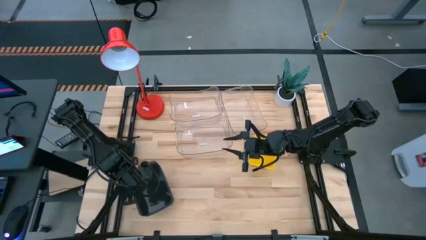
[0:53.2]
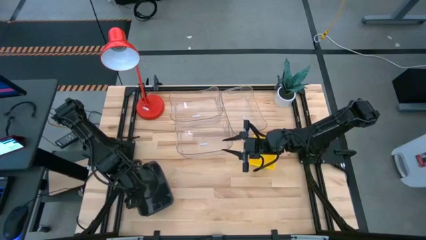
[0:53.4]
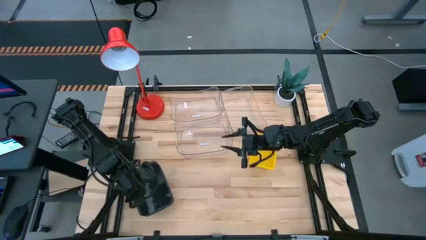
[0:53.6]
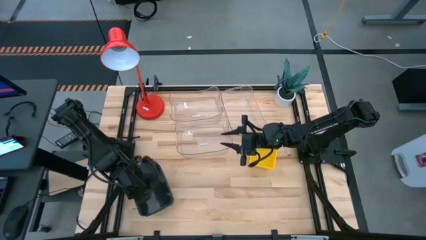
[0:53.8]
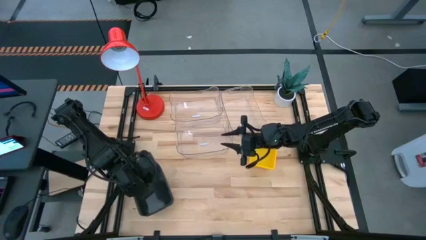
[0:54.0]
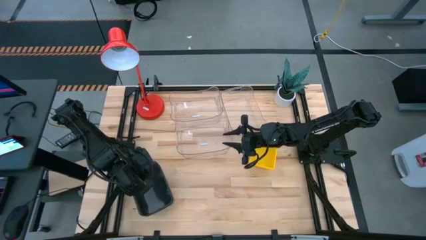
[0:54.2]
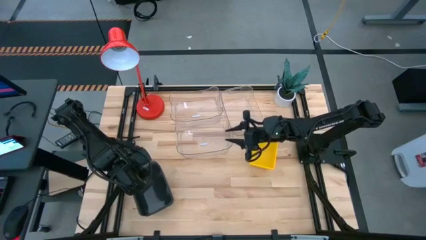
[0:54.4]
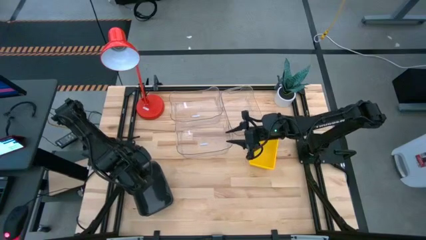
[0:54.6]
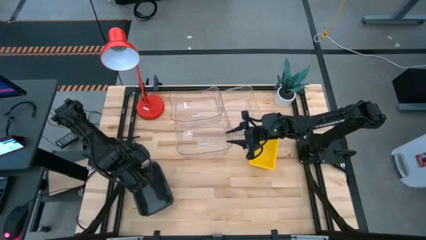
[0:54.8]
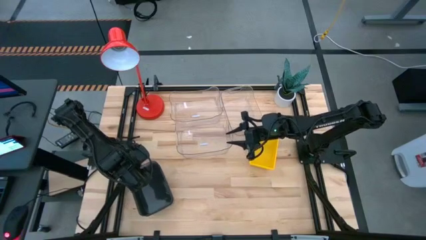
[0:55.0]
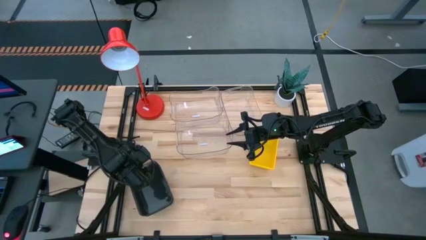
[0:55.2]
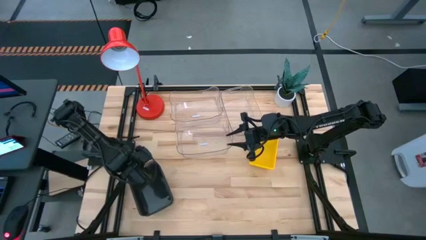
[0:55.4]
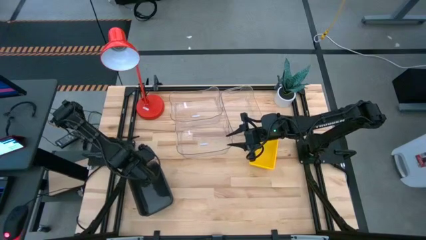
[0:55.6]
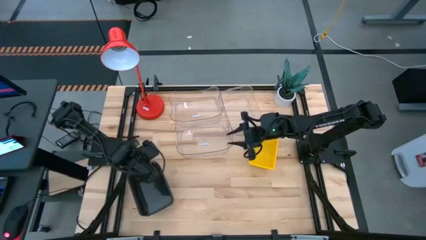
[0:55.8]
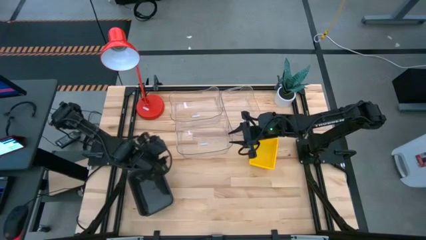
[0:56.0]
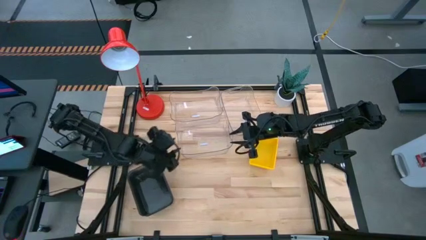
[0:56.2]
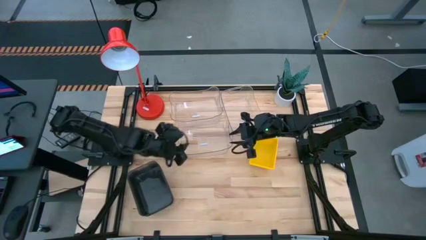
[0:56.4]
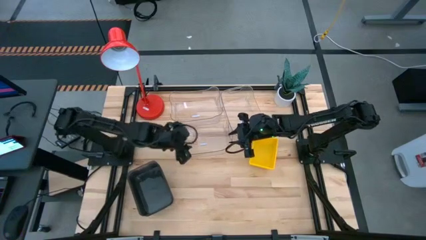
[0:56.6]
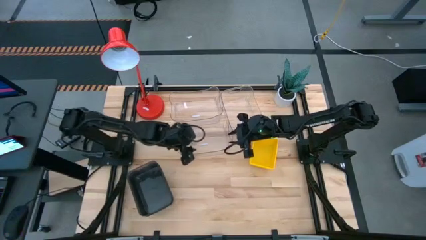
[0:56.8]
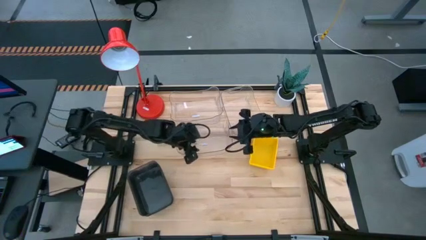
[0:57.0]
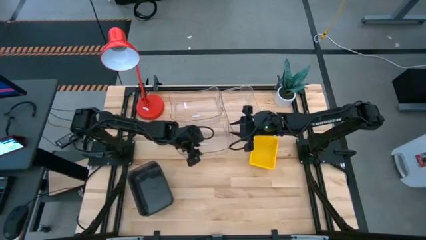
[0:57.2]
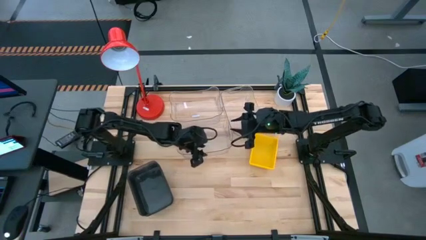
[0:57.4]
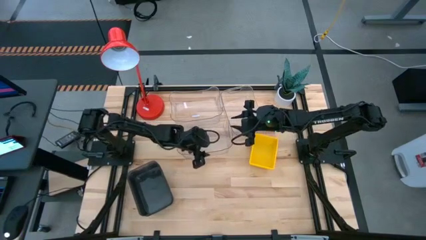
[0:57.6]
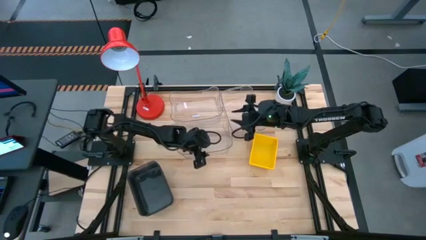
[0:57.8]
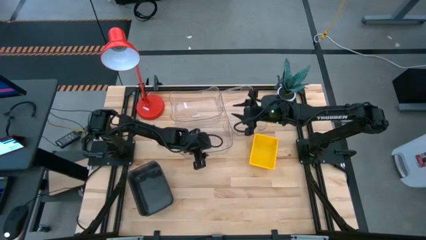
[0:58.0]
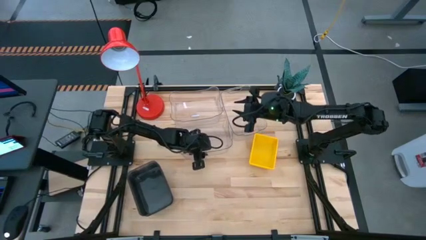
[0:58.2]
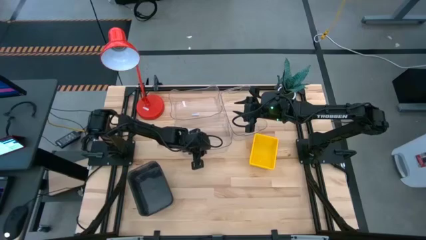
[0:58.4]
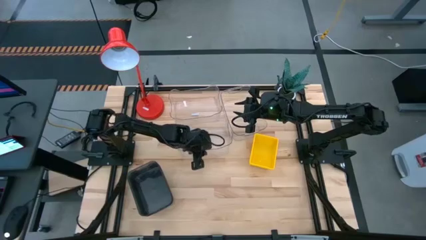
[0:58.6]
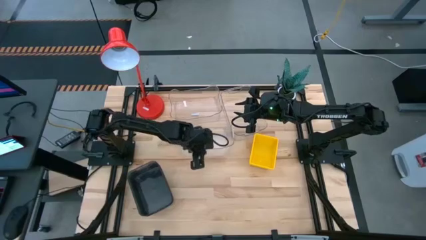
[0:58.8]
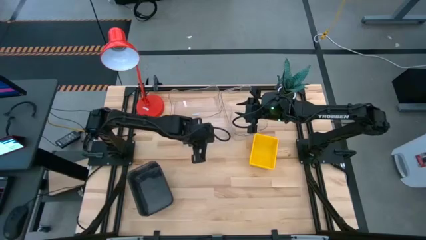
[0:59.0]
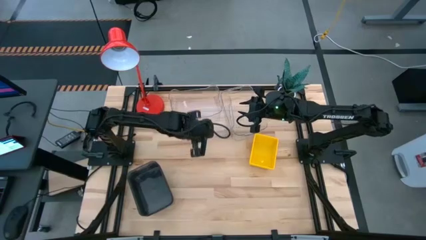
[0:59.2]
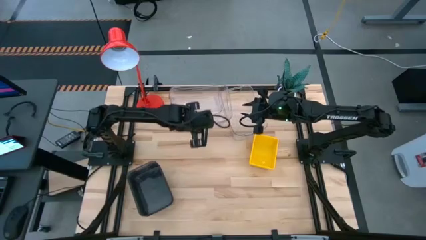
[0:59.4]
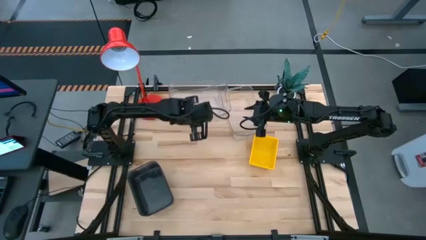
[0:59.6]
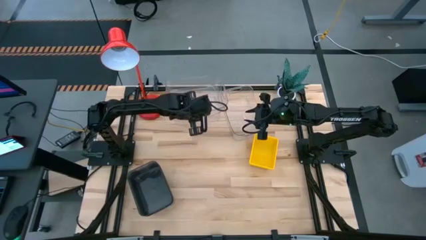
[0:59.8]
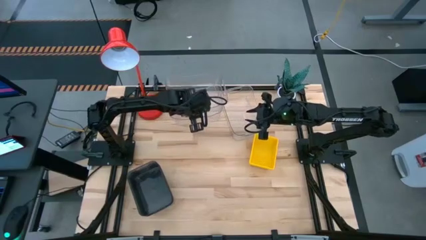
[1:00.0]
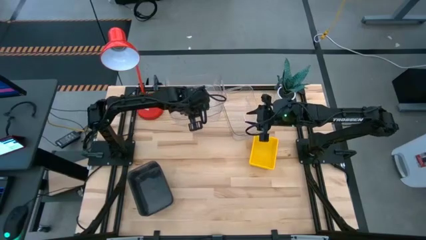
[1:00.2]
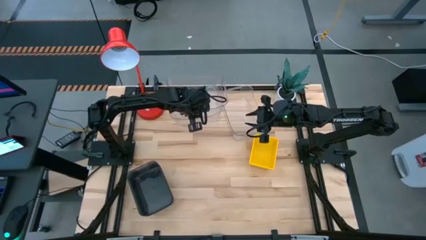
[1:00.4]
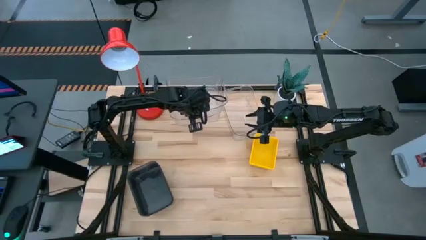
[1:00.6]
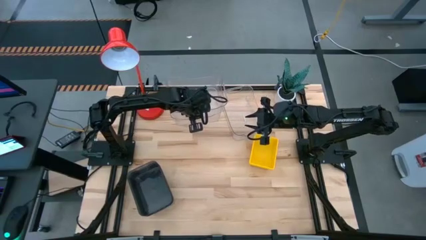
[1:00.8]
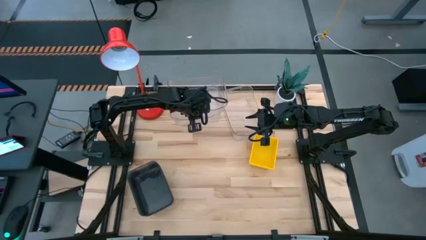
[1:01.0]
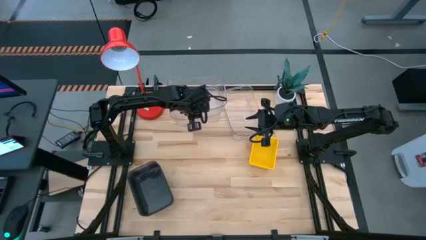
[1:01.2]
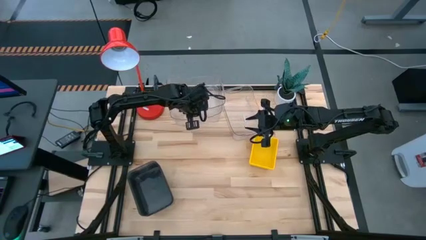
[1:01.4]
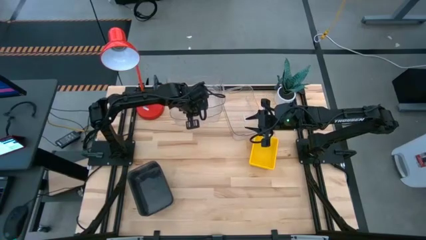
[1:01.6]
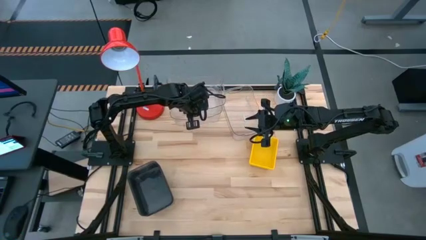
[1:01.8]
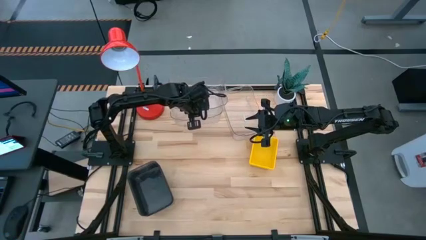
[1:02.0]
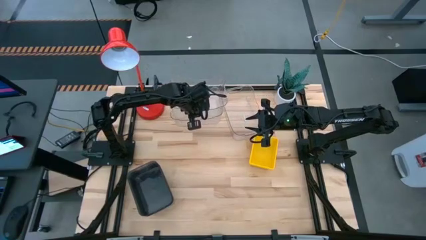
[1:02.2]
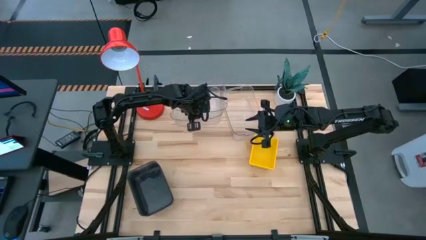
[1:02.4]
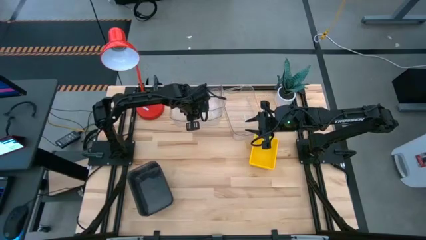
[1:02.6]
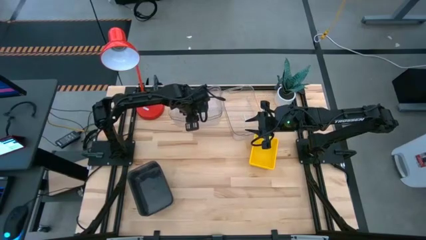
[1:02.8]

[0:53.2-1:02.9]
Stack the bottom transparent bin on top of the top transparent bin

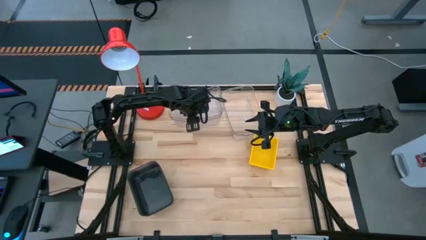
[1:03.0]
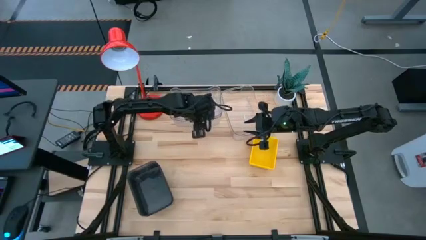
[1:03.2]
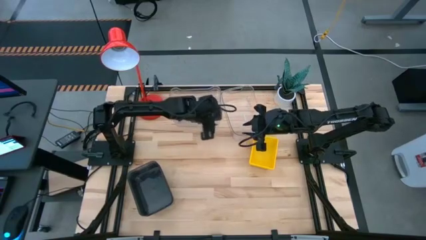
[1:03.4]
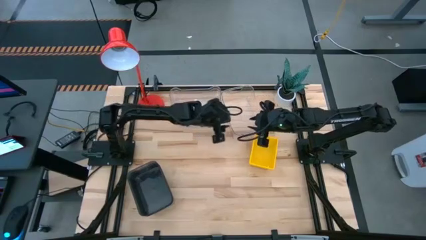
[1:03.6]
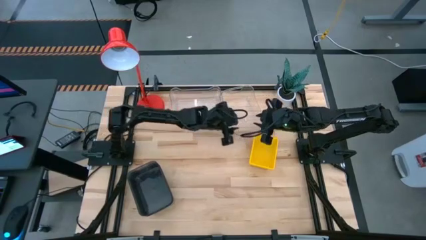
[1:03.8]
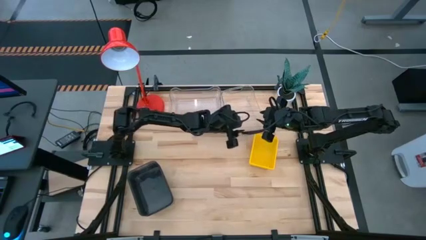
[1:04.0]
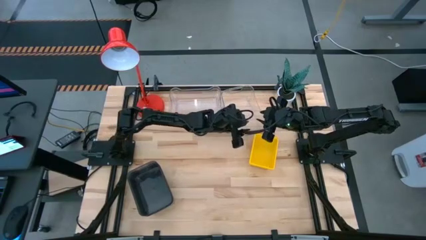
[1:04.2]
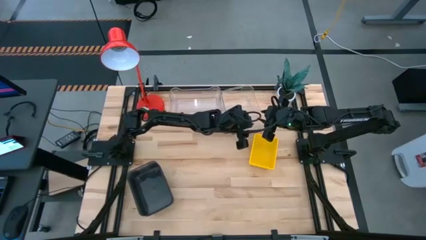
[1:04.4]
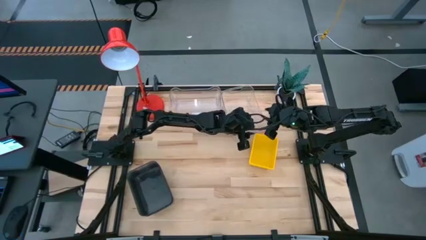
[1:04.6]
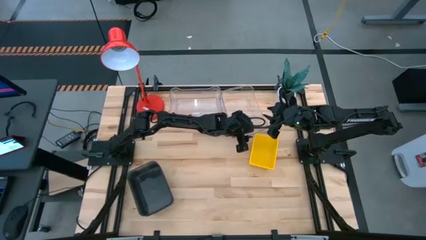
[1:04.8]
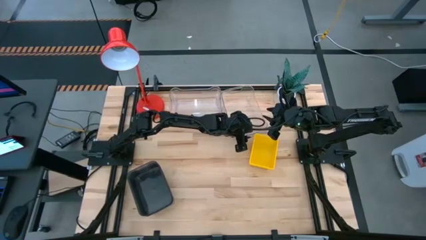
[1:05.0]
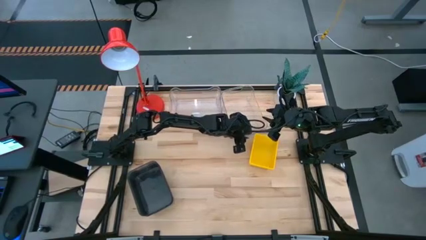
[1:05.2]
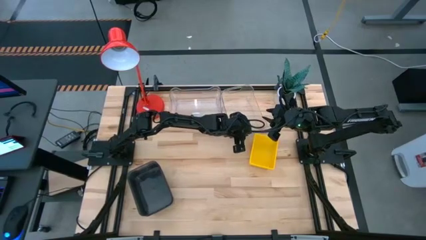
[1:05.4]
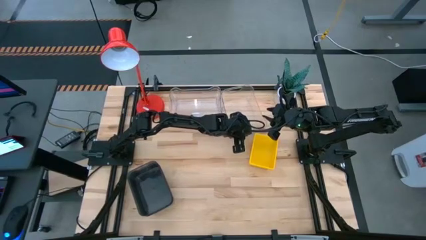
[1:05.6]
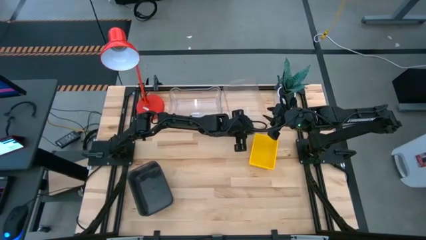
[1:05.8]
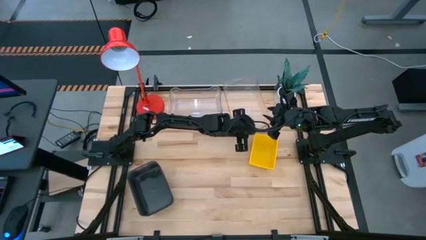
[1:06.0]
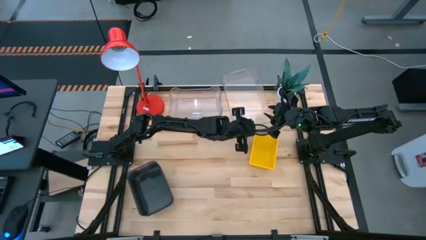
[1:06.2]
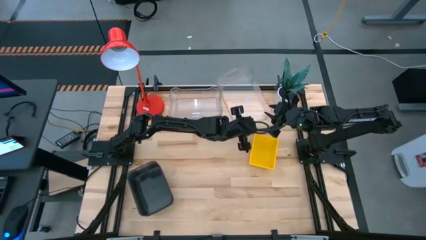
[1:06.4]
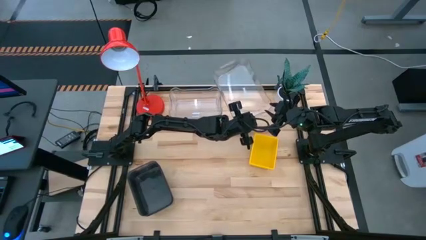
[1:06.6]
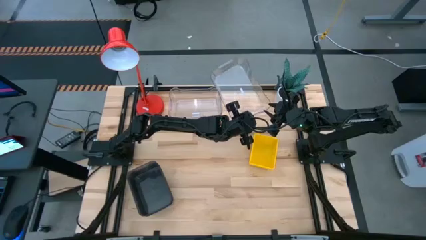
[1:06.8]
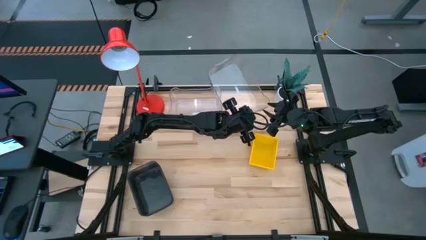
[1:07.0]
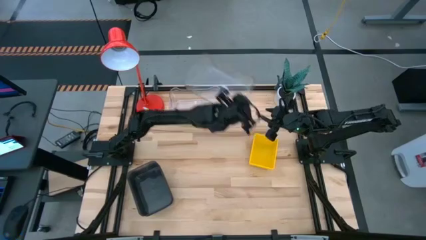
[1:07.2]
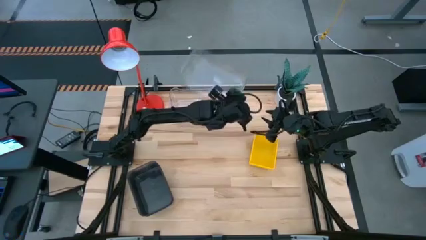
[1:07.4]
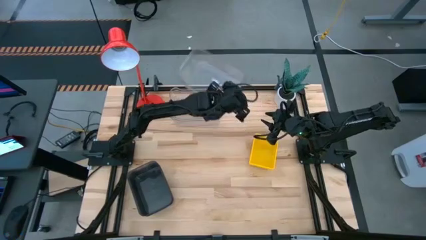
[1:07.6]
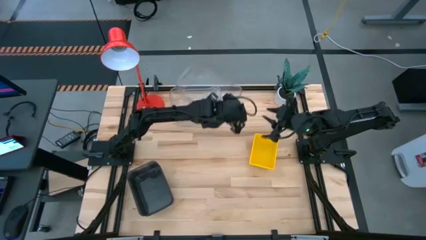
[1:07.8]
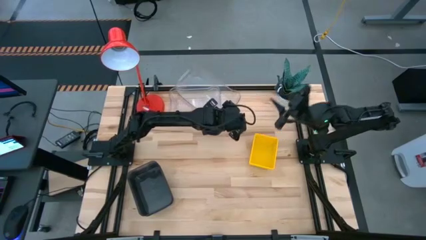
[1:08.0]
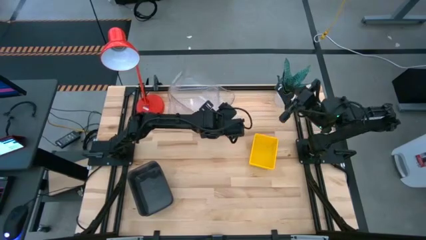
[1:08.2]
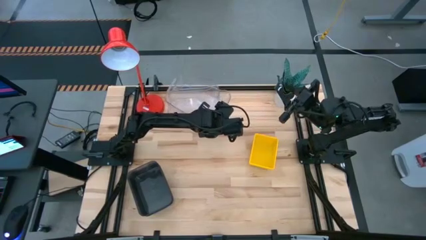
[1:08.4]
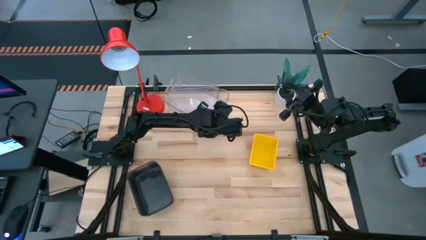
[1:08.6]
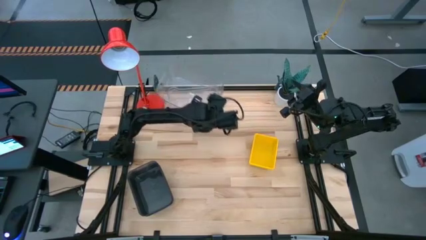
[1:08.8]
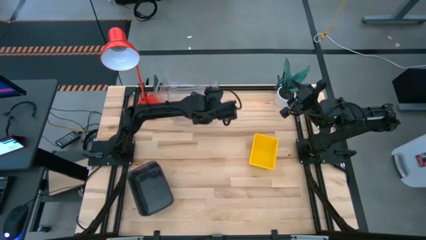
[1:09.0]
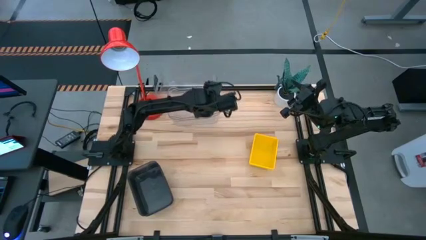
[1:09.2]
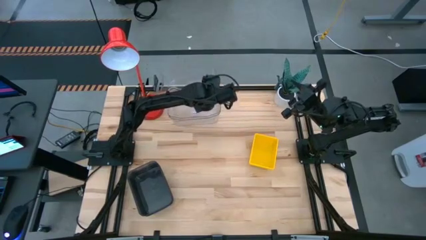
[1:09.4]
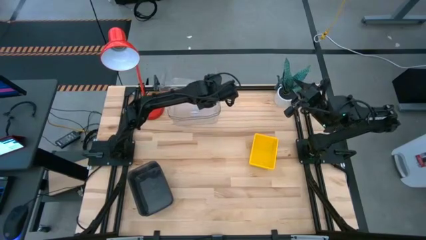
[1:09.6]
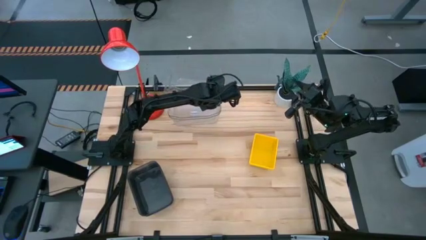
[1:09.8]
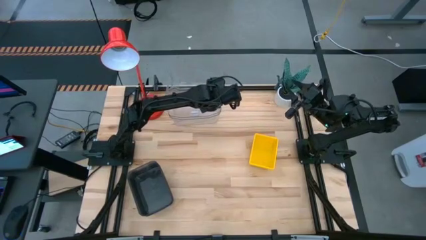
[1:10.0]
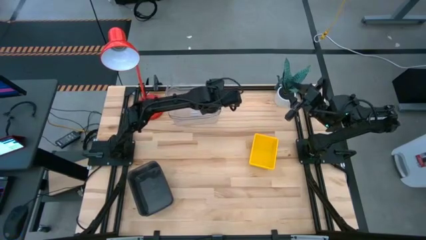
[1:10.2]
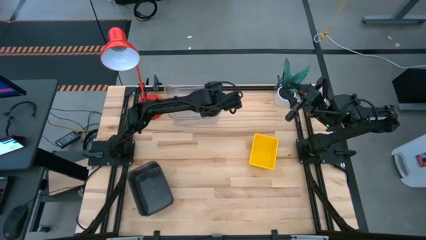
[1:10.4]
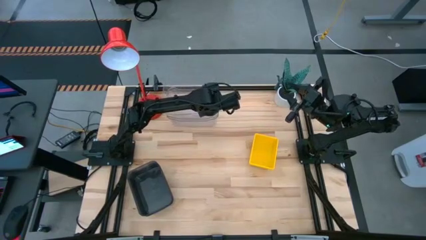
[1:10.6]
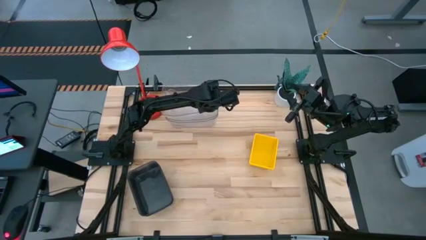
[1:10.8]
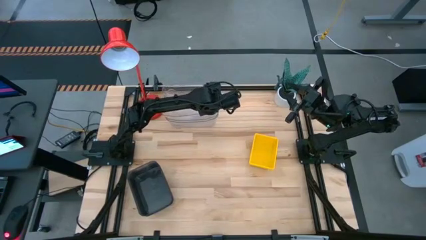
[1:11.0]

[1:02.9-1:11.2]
Stack the right transparent bin on top of the stacked transparent bins
